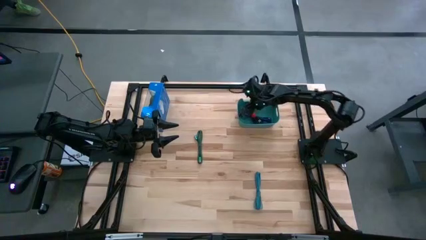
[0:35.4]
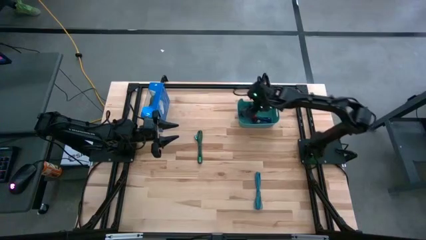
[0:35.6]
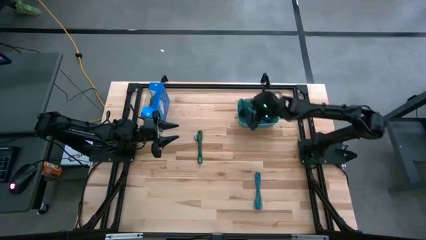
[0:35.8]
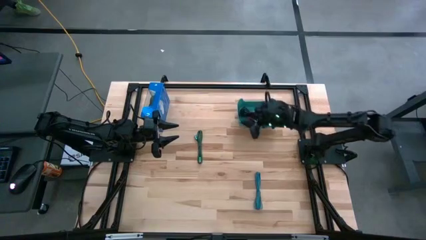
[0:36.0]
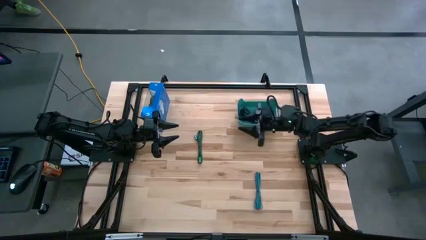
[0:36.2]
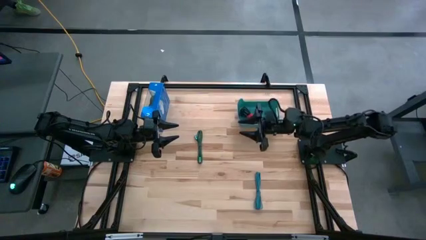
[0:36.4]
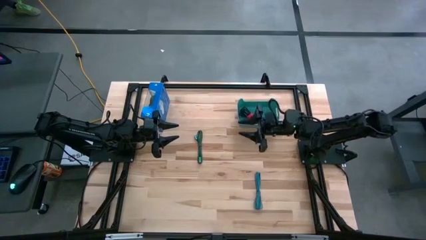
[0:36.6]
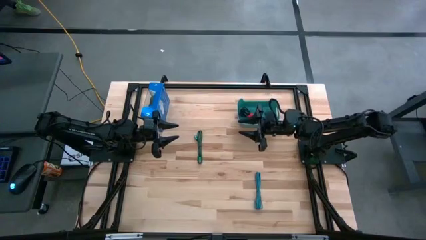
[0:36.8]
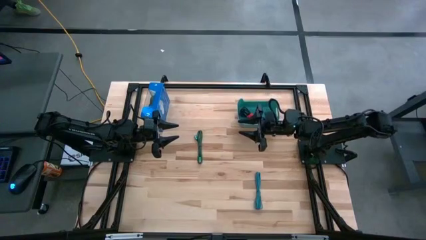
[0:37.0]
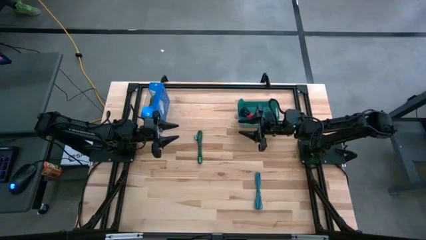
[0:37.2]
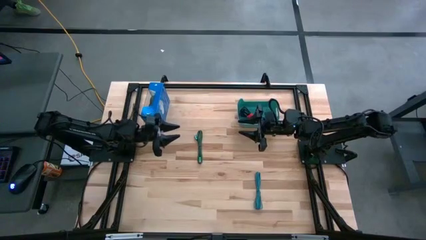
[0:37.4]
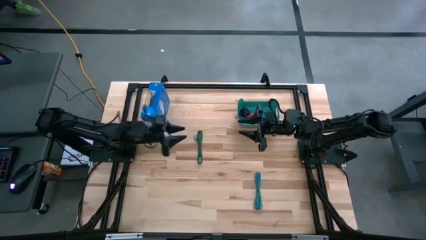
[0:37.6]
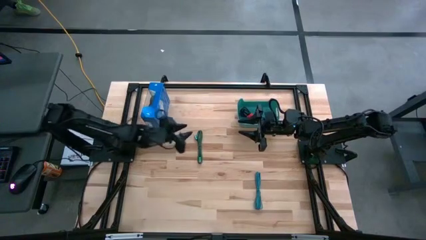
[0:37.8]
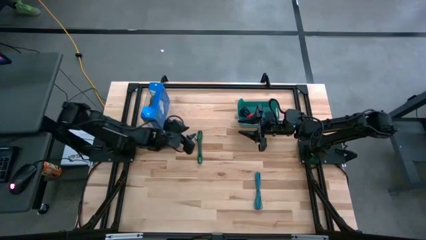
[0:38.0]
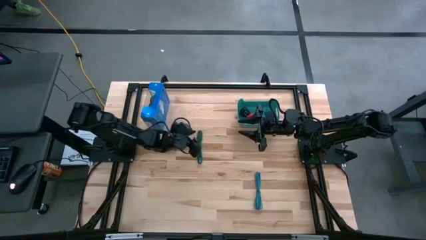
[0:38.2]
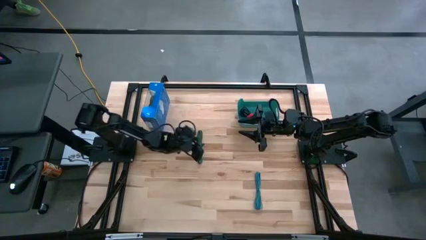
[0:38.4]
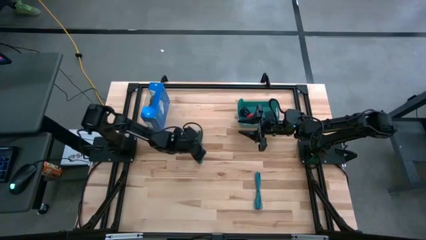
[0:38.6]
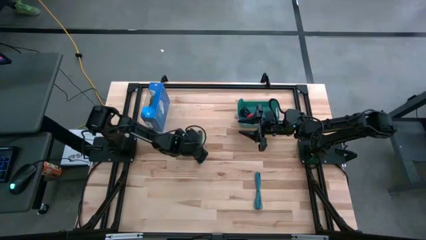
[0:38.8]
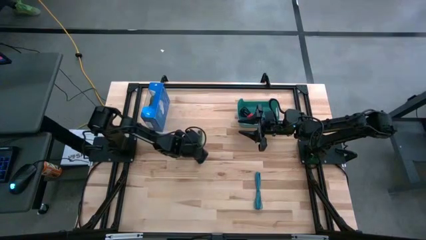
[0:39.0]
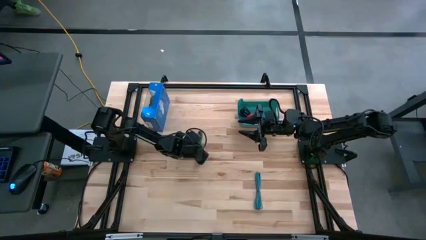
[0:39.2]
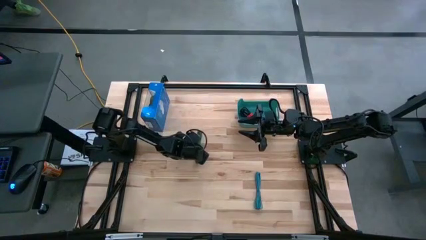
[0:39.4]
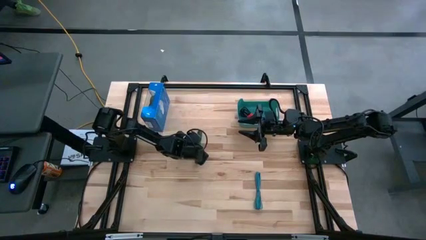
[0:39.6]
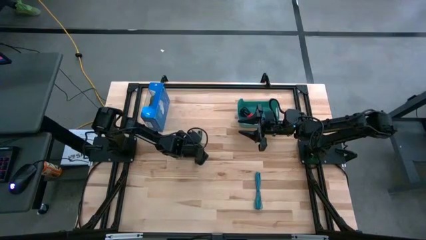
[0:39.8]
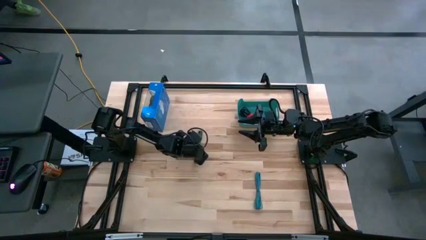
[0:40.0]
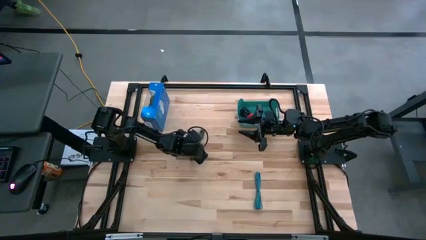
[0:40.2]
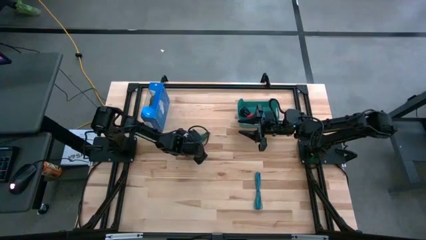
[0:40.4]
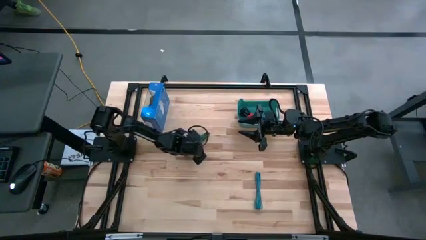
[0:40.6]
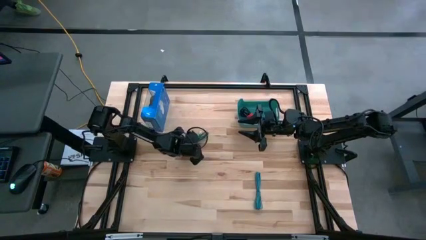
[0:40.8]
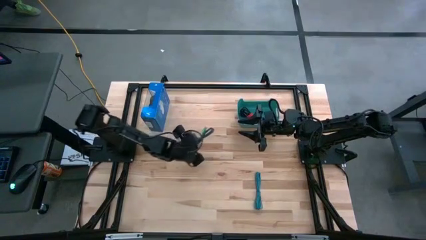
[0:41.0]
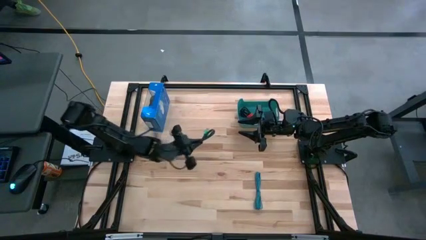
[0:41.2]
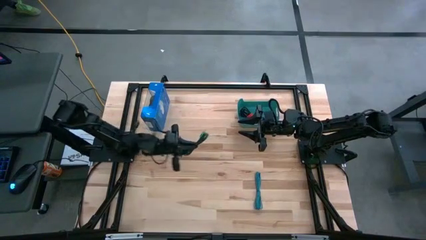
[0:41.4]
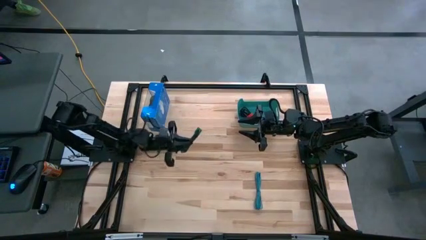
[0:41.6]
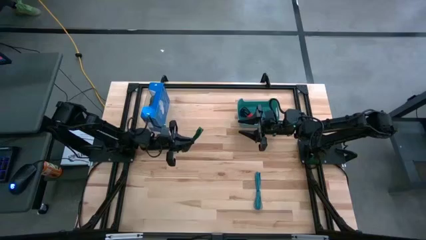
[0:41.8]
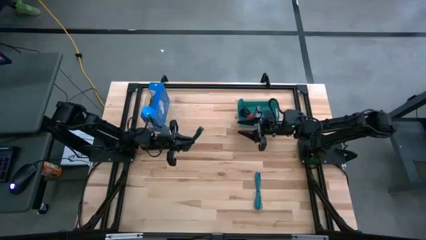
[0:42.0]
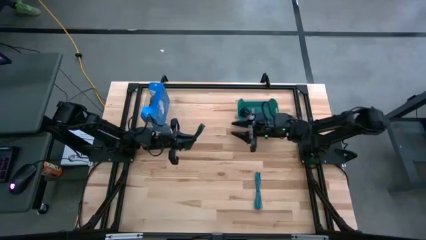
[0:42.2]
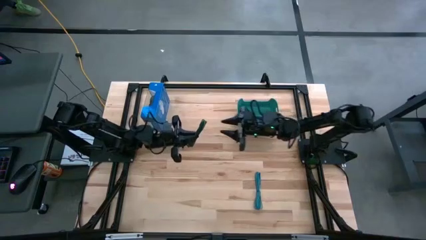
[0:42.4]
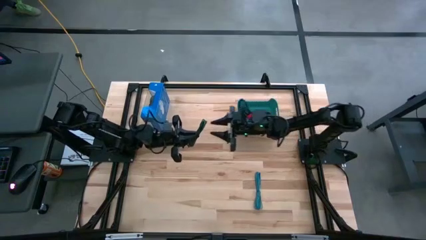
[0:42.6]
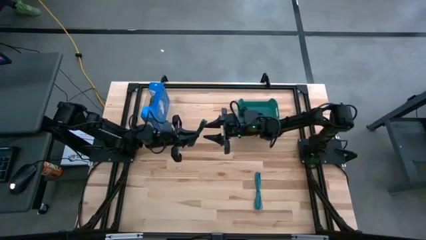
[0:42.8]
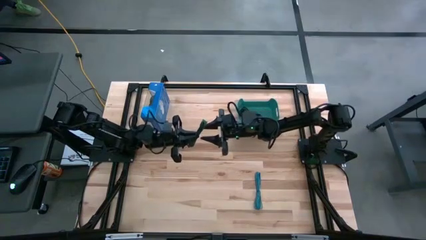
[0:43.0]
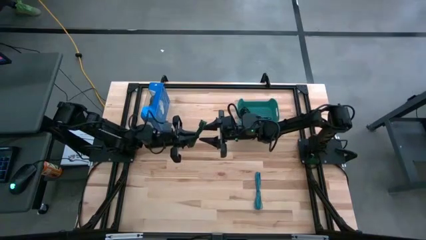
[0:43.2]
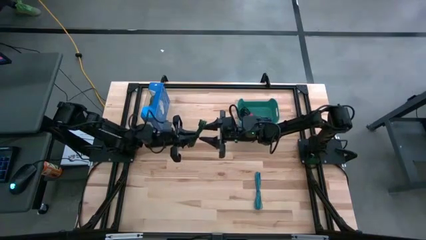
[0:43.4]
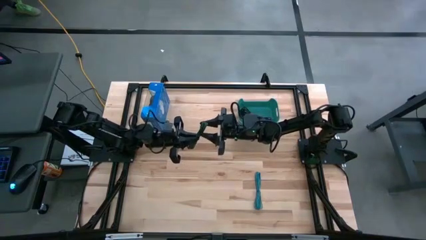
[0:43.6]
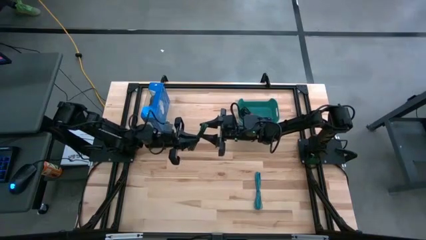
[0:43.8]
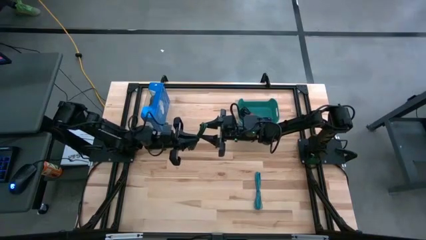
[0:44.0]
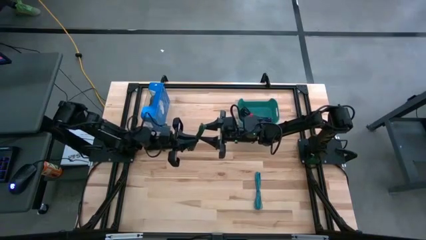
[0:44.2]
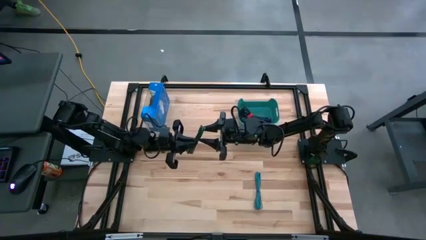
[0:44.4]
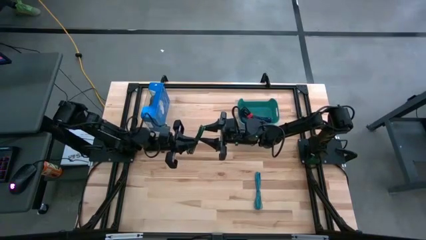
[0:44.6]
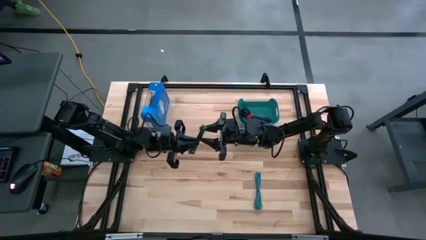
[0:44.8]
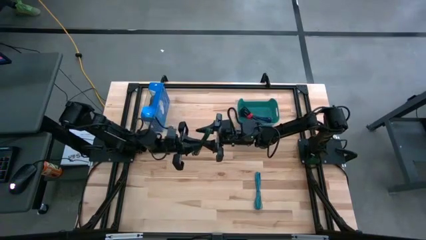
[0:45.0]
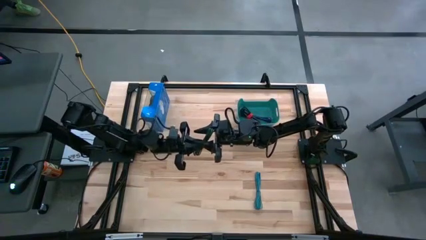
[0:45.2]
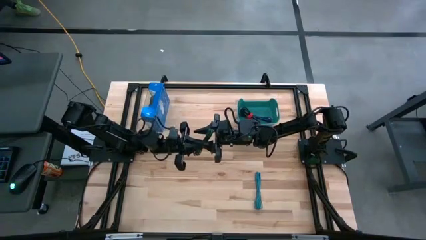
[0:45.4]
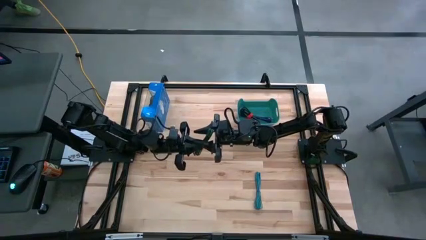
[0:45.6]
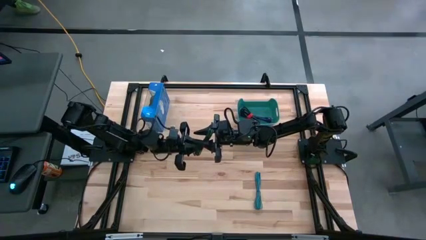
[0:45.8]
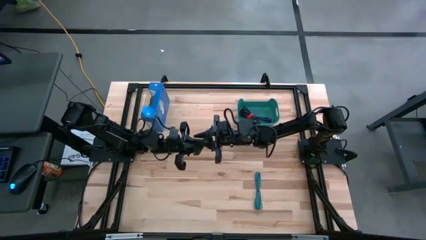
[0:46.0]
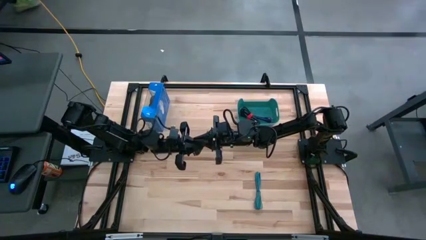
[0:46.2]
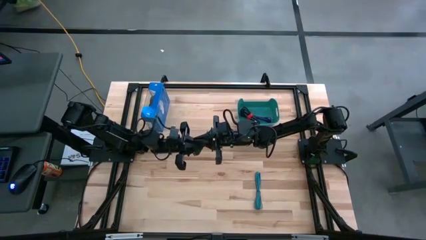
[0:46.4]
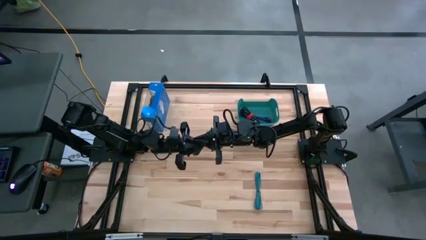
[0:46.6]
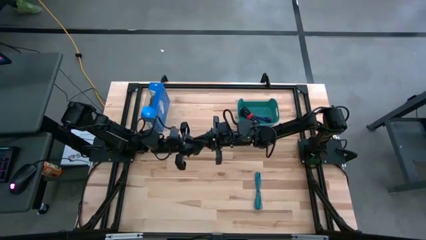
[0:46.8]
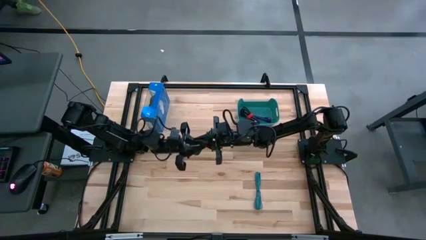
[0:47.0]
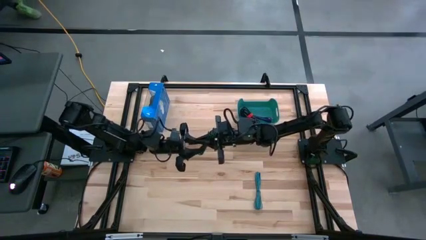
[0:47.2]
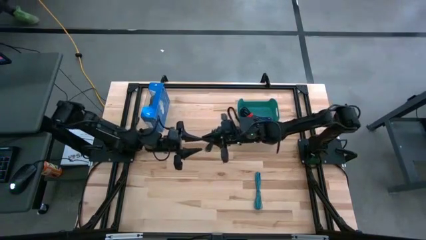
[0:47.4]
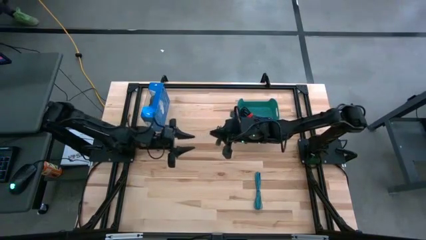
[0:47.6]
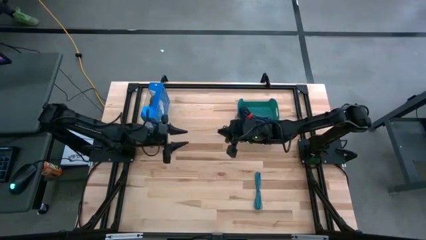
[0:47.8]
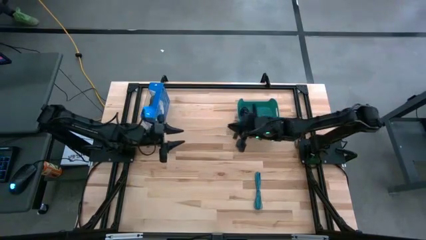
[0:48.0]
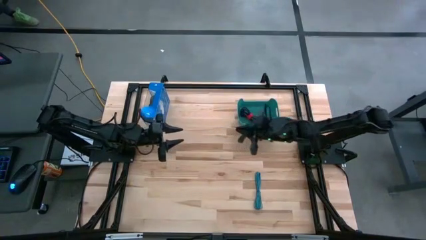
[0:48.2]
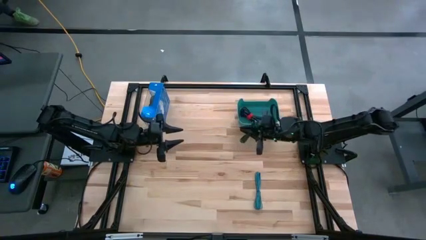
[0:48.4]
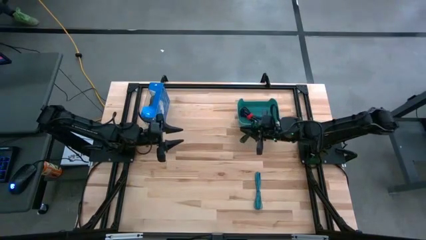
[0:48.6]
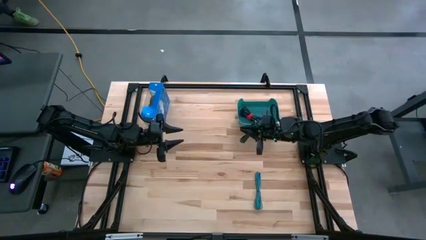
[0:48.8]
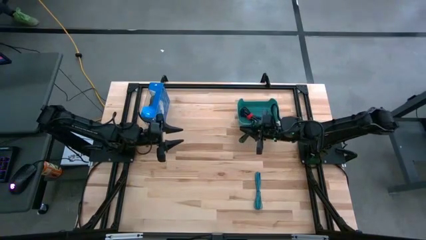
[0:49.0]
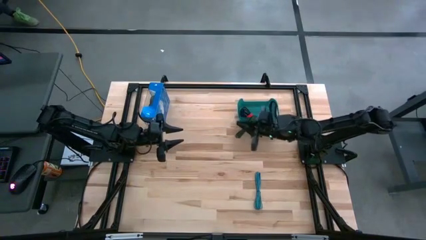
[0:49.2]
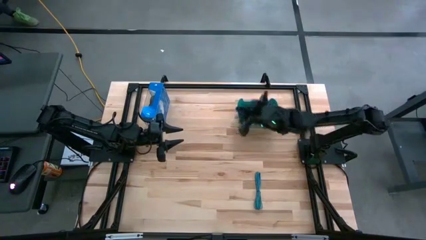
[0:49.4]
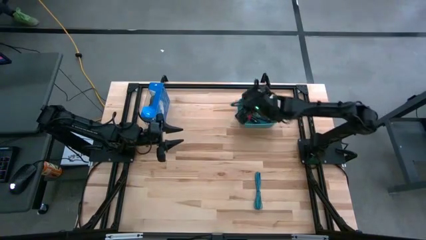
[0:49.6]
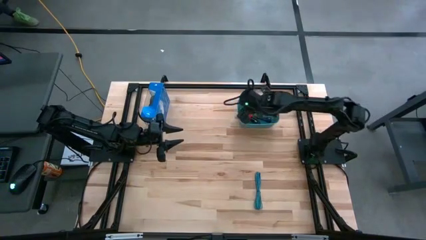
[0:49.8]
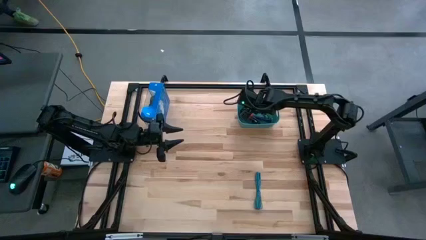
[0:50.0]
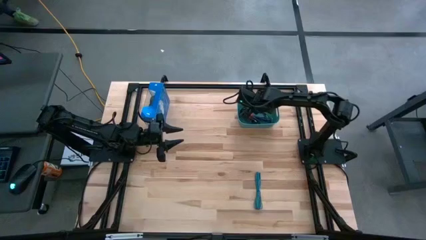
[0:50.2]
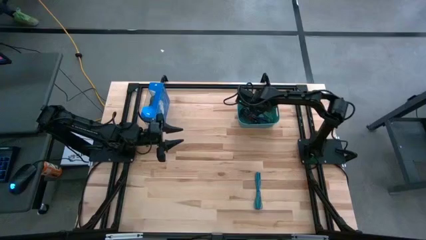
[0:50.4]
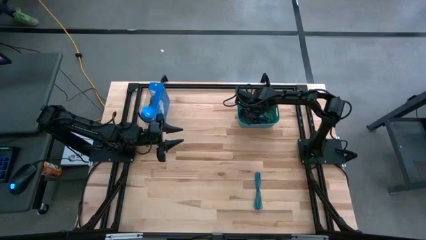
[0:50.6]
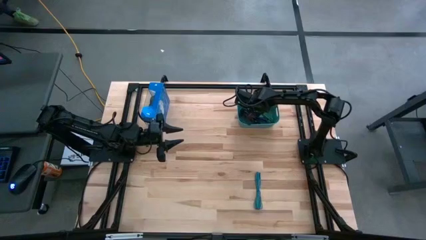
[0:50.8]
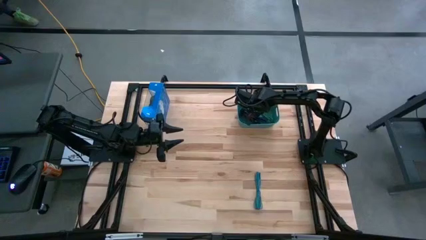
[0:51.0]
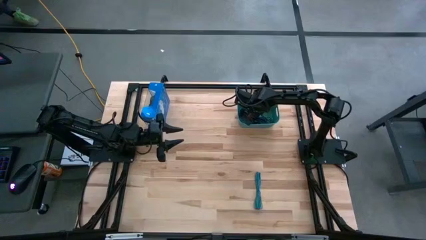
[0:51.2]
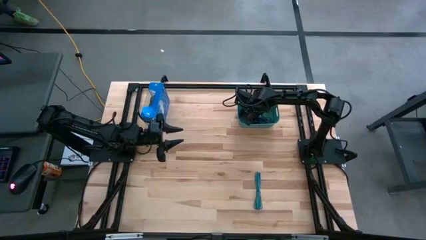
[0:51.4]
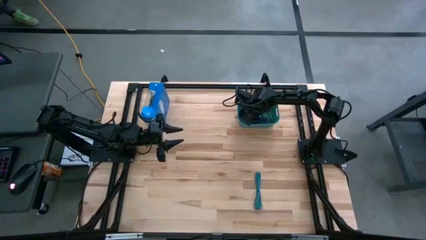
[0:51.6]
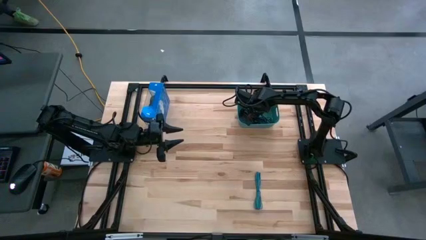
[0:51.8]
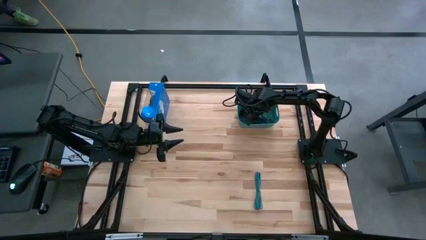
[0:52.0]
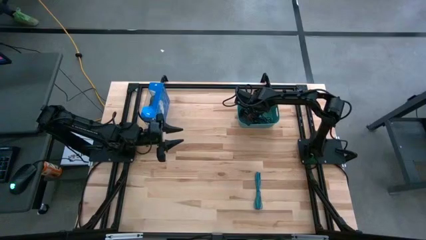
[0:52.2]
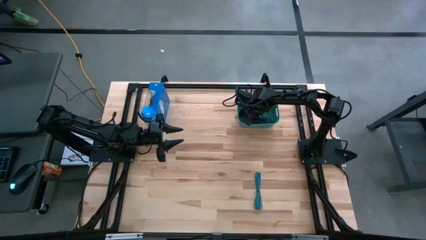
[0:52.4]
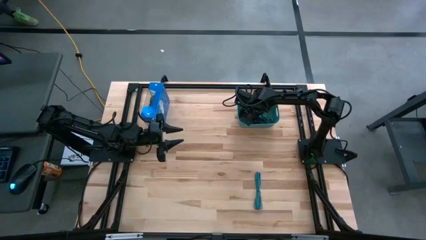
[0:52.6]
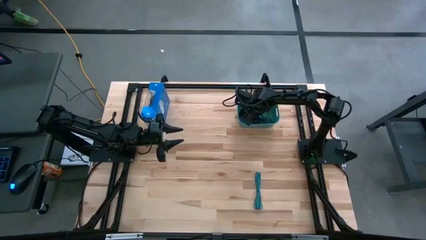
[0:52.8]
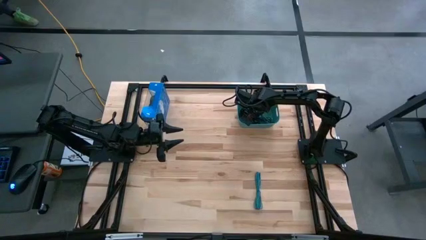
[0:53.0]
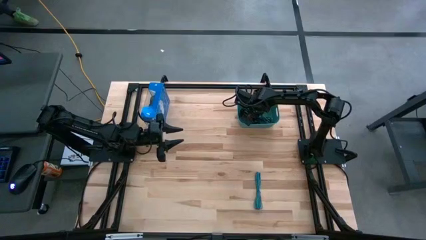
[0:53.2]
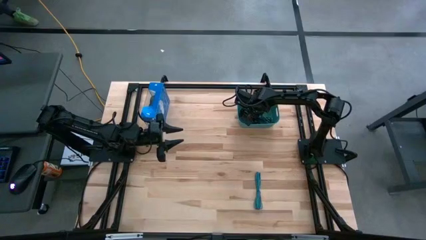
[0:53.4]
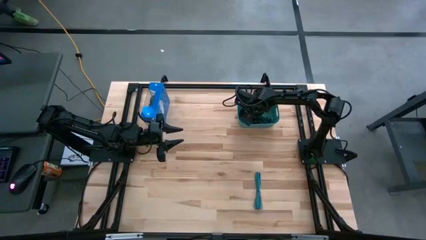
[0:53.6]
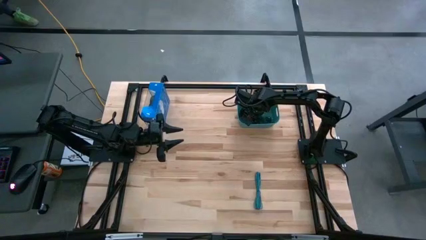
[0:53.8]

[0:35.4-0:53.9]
Task: Pick and place USB-C Cables
Put the green charger cable into the green bin
